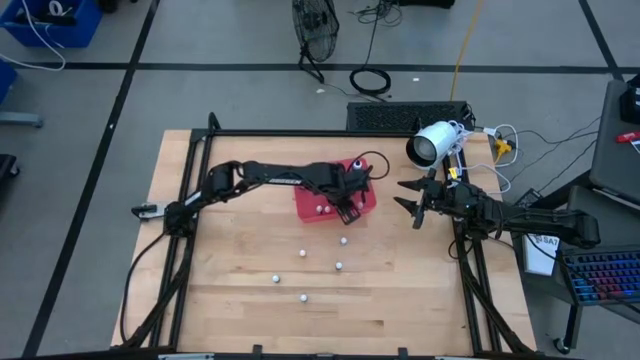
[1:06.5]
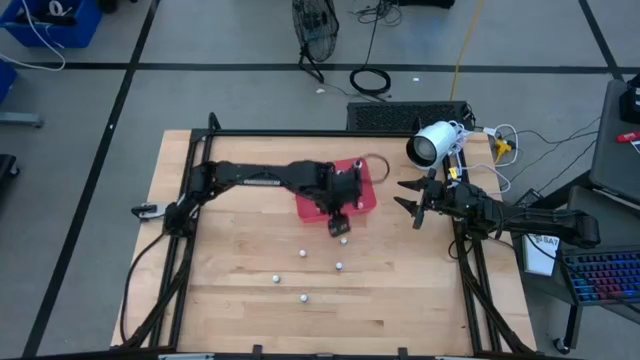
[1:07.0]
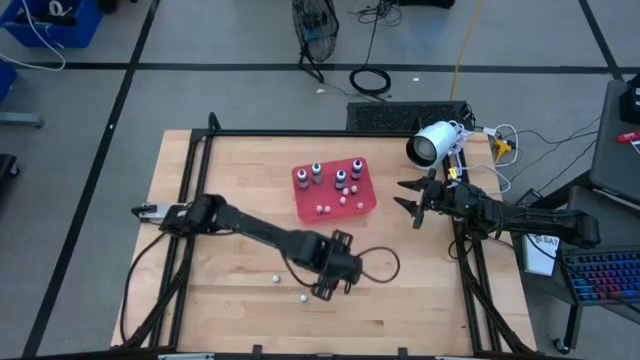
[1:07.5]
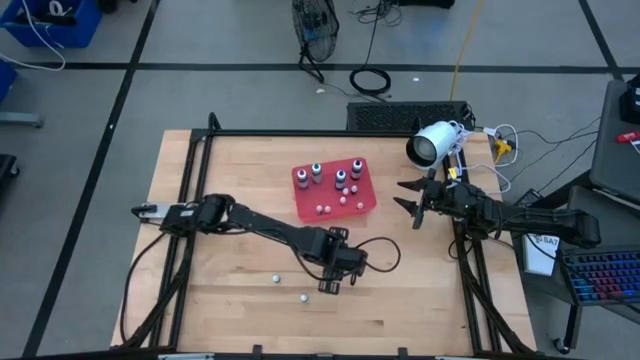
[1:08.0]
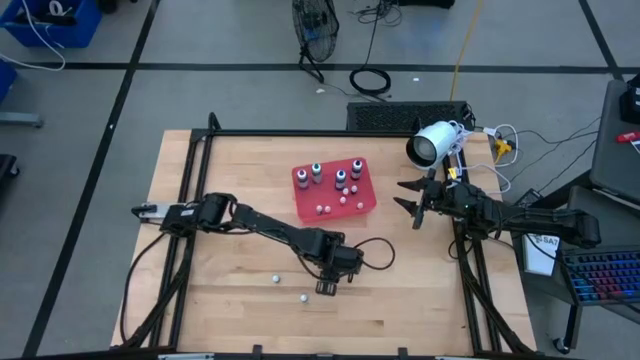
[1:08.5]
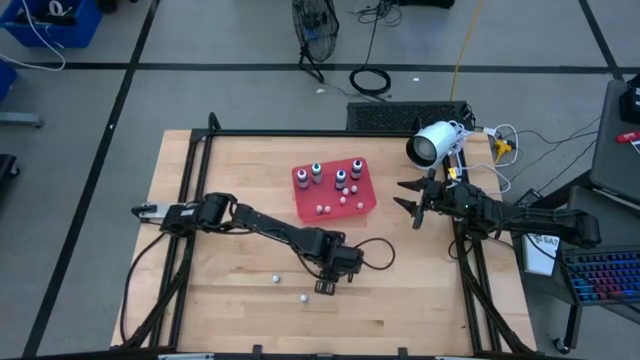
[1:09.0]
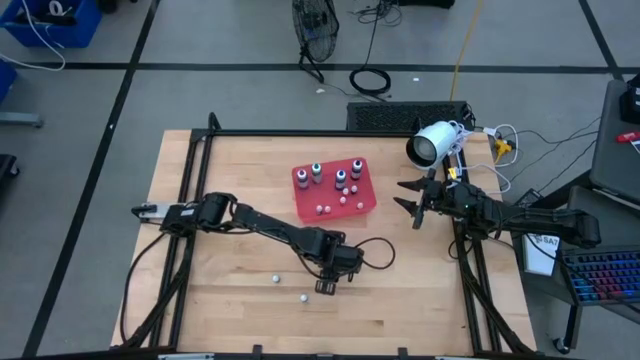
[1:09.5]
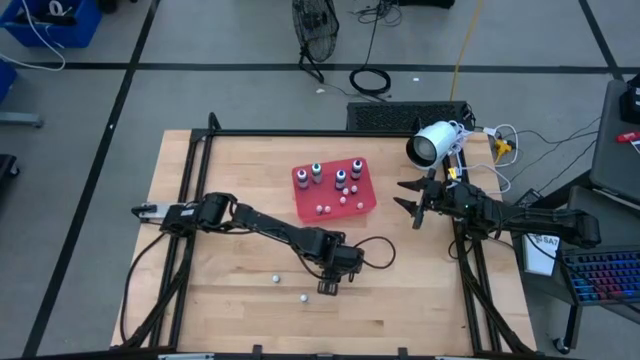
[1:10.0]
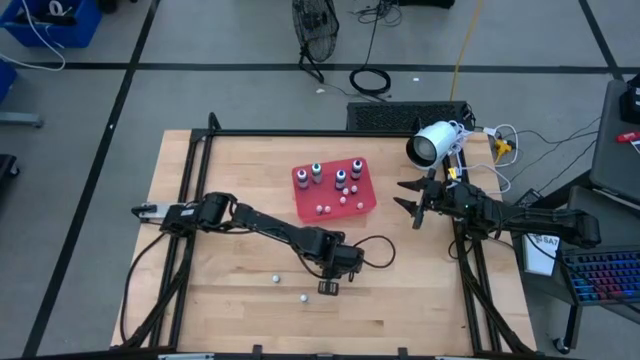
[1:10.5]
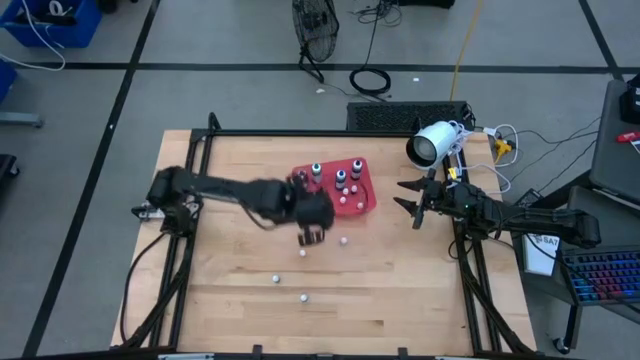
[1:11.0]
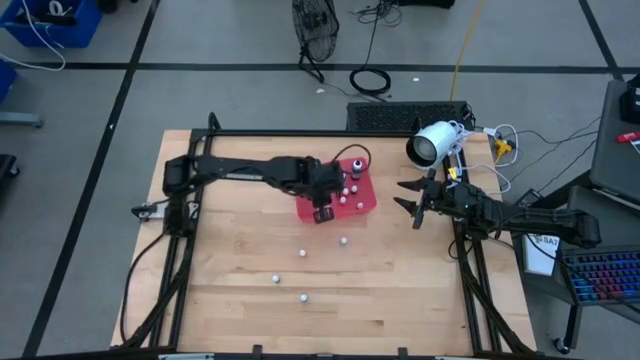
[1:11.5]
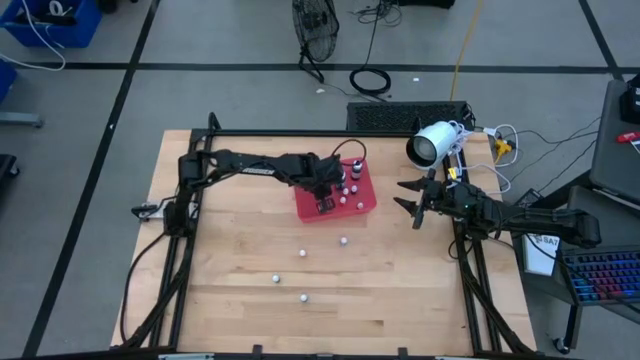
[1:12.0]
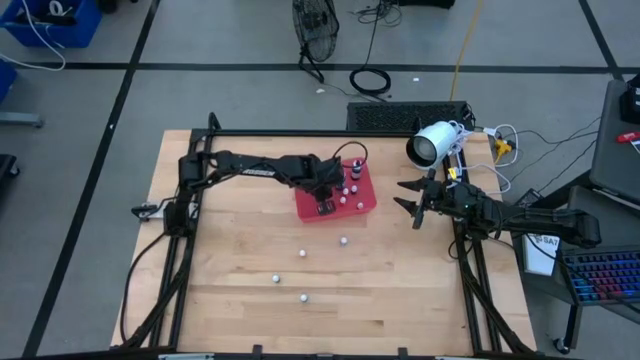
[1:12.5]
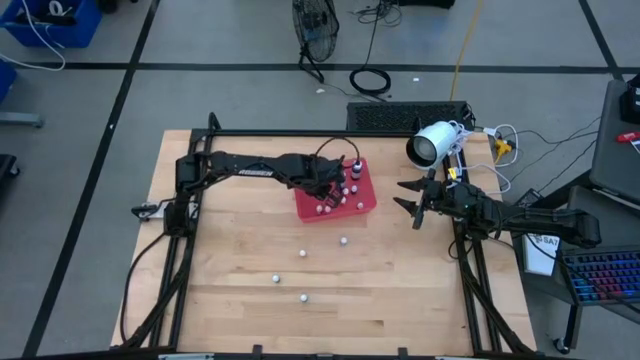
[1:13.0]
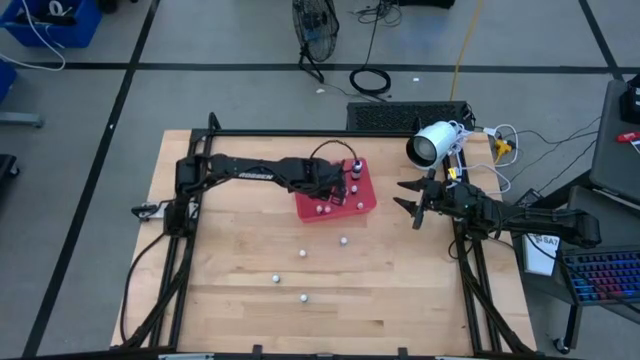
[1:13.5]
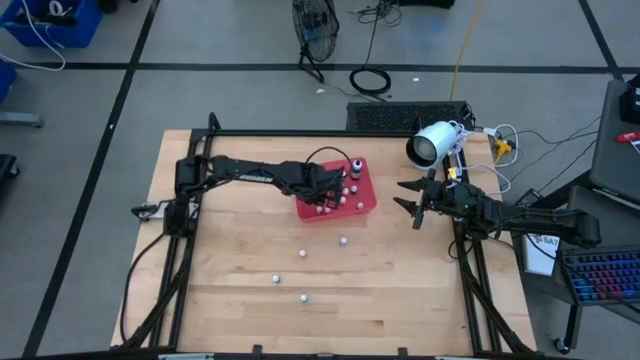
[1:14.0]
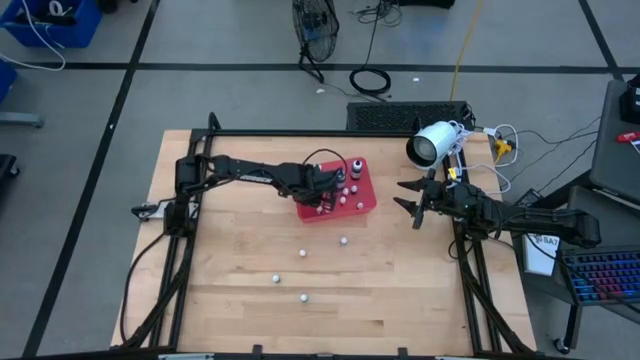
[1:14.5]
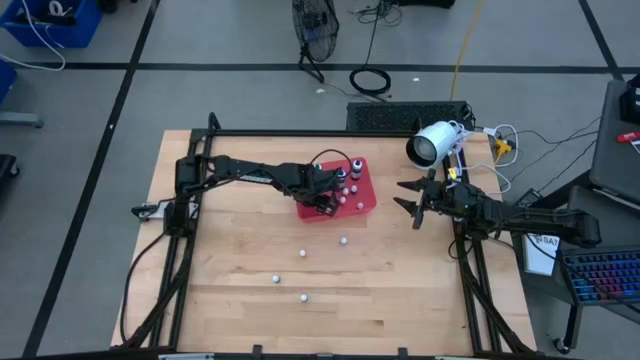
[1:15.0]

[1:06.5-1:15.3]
Task: Pick & Place food coloring
Put the top small purple food coloring bottle into the bin

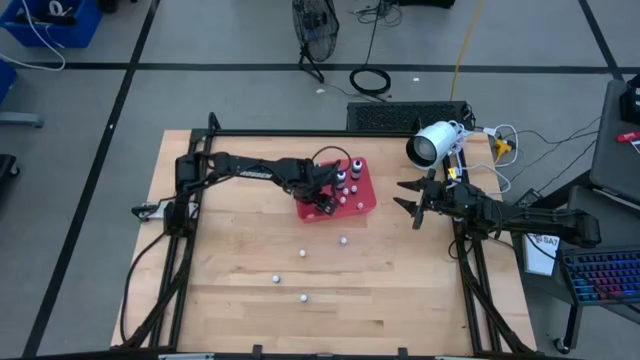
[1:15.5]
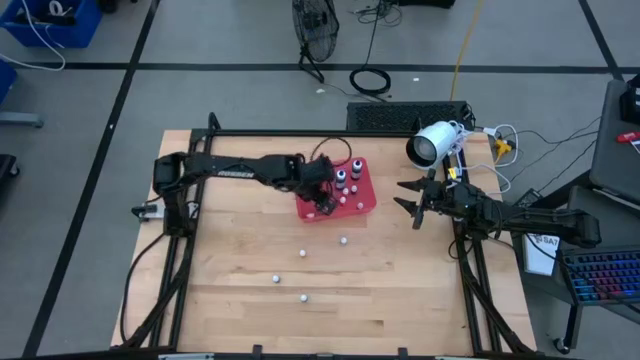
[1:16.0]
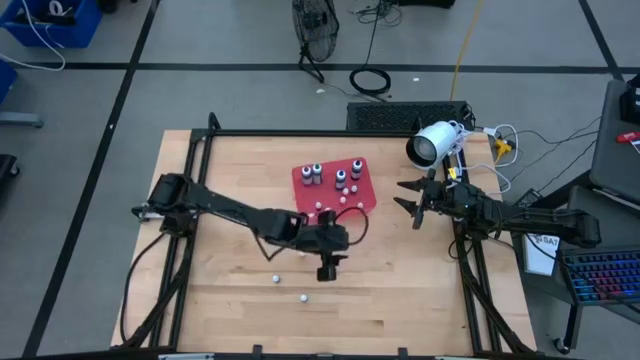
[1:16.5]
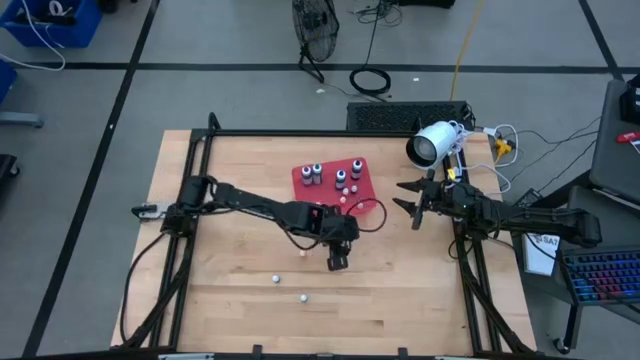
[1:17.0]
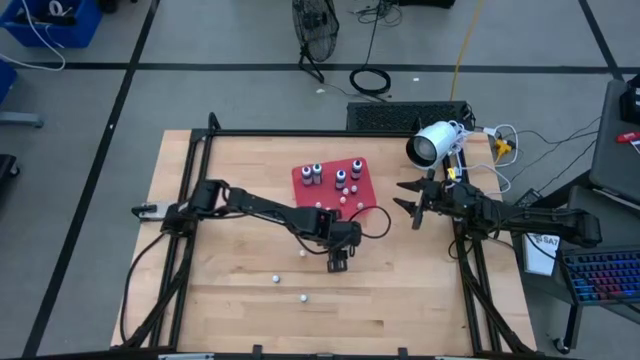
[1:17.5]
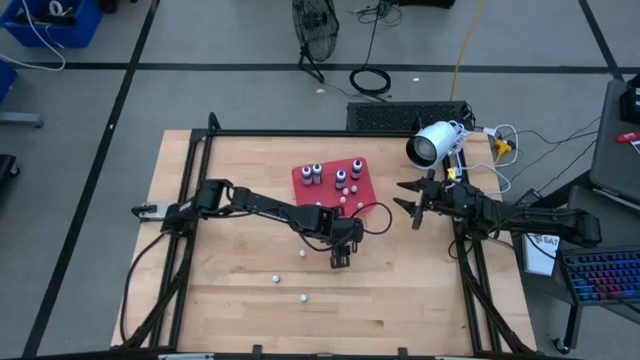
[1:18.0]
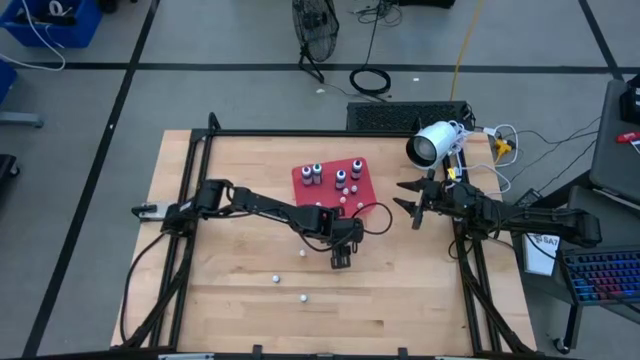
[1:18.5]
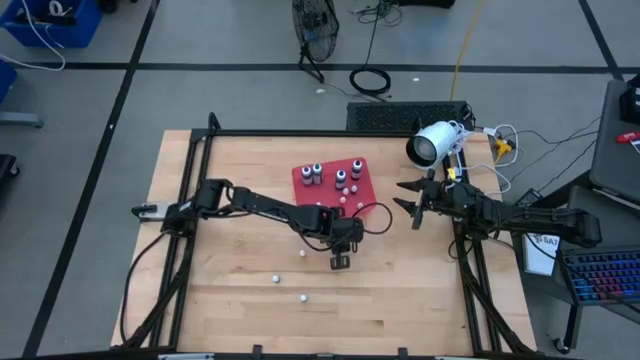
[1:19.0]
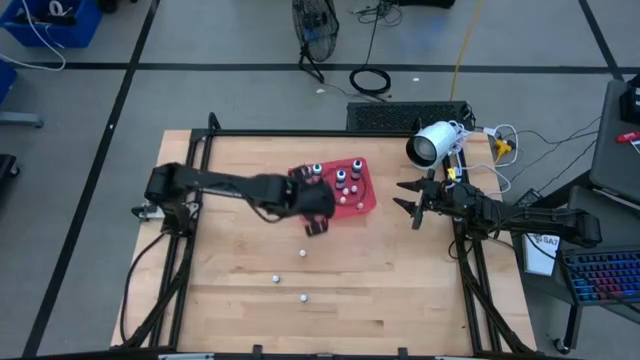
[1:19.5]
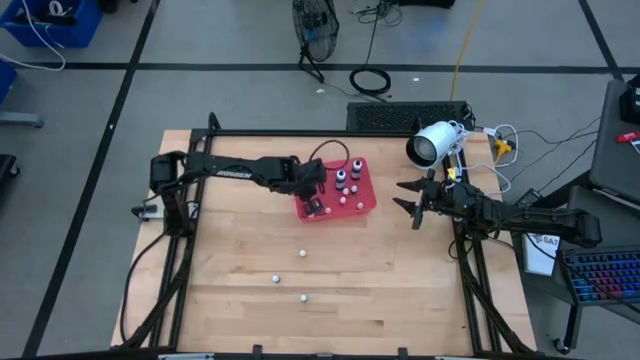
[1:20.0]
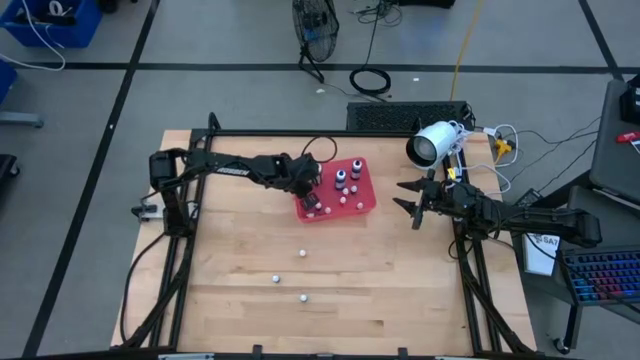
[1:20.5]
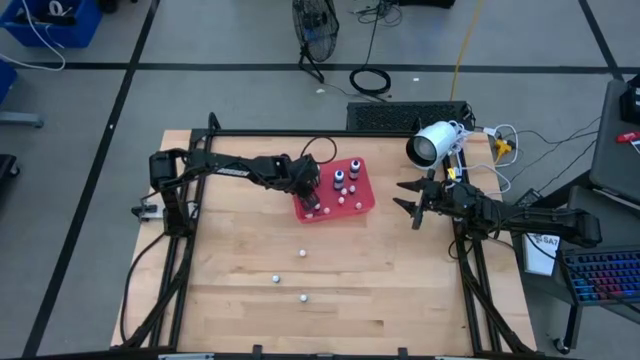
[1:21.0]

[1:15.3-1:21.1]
Put the small red food coloring bottle into the bin

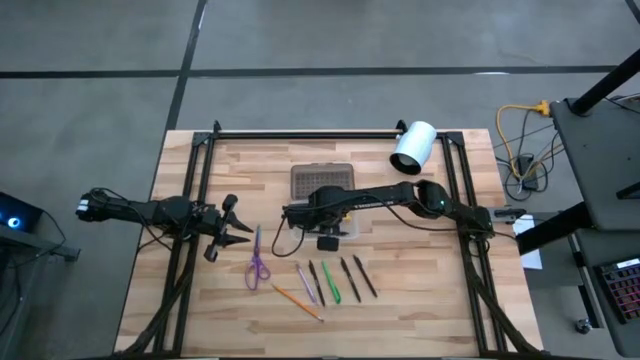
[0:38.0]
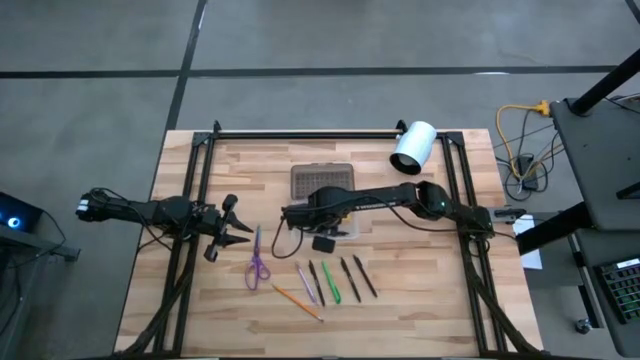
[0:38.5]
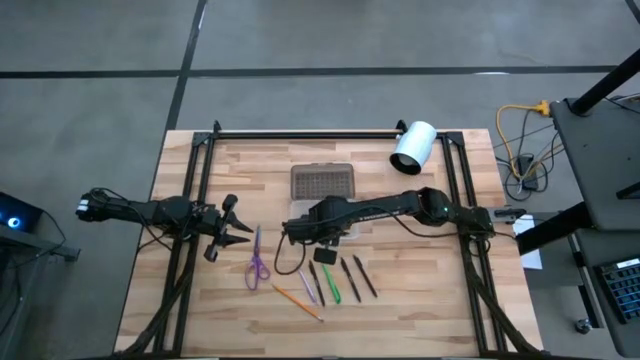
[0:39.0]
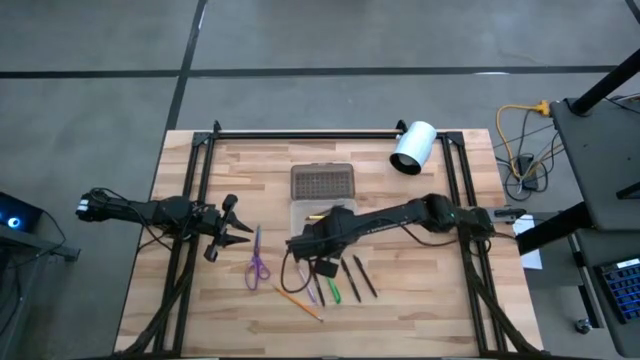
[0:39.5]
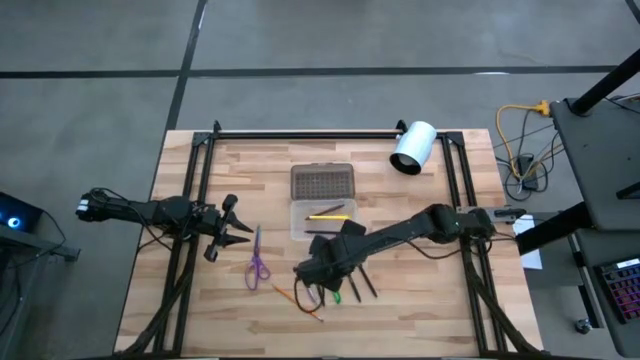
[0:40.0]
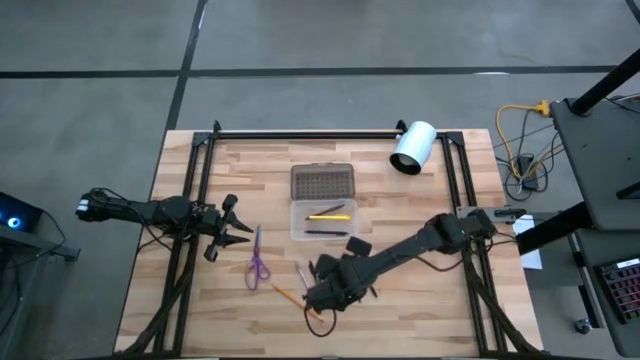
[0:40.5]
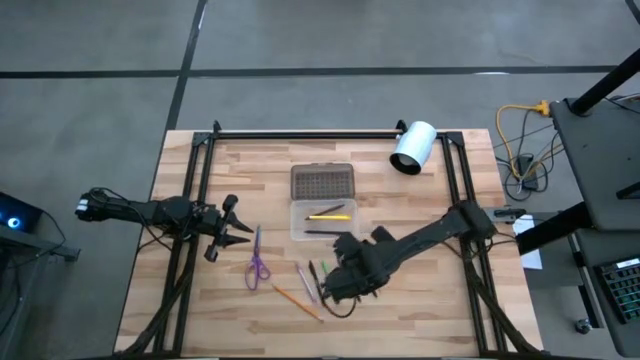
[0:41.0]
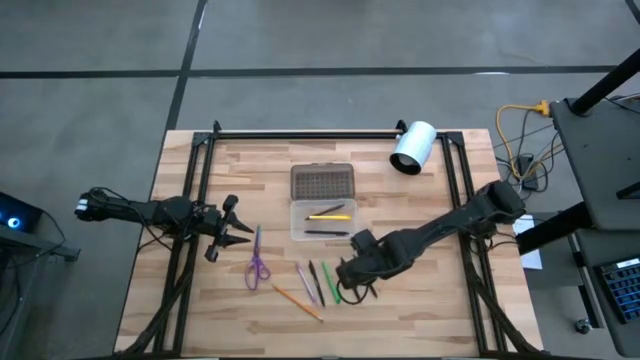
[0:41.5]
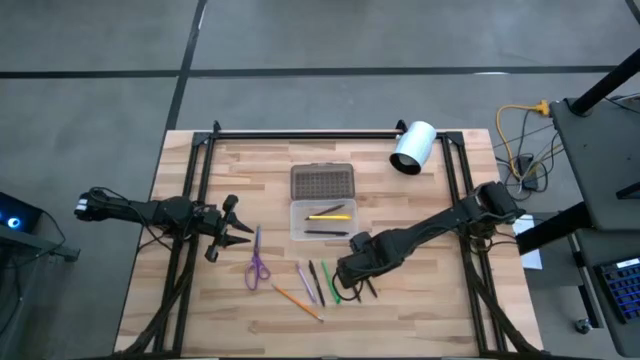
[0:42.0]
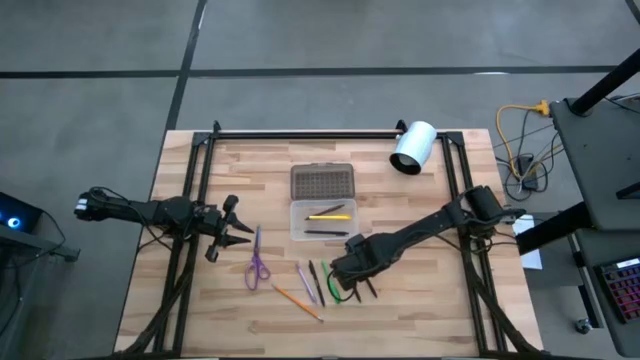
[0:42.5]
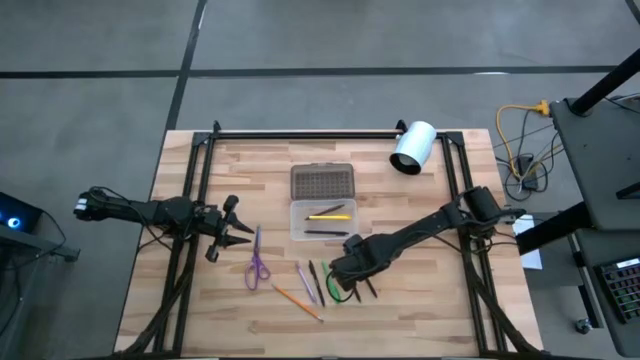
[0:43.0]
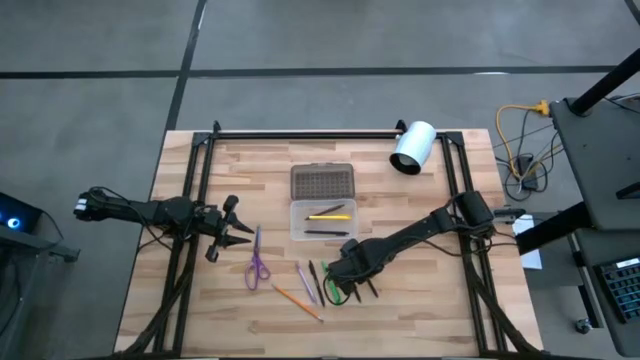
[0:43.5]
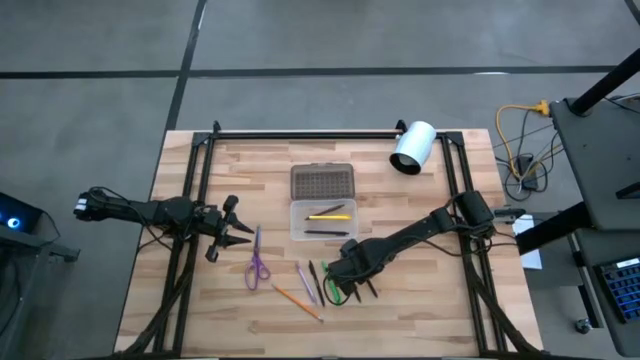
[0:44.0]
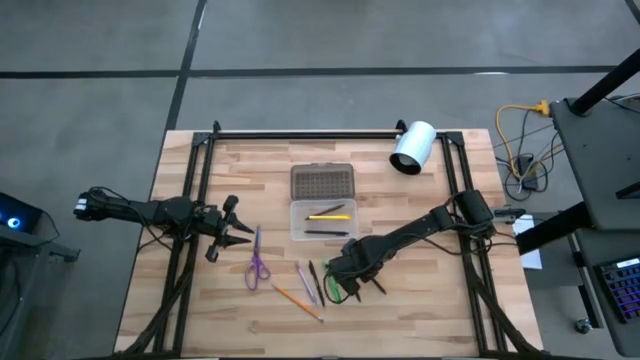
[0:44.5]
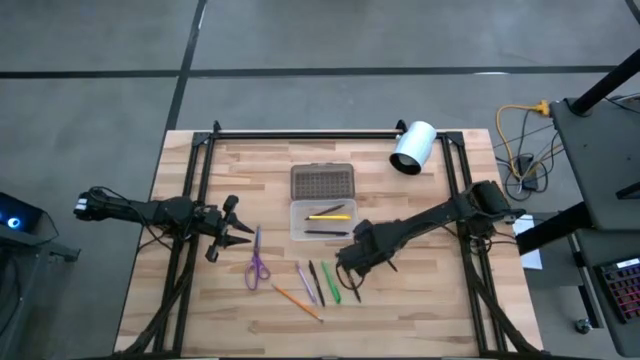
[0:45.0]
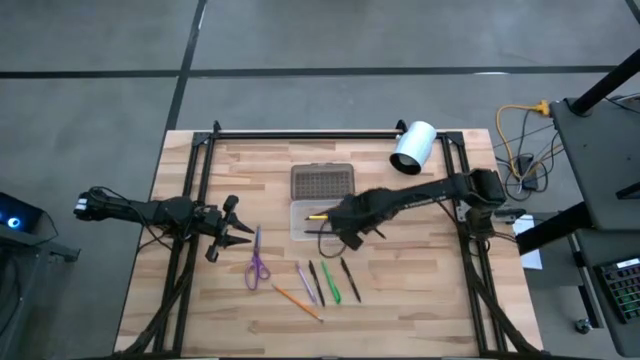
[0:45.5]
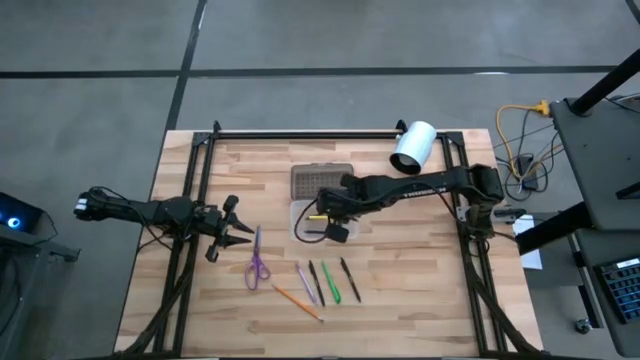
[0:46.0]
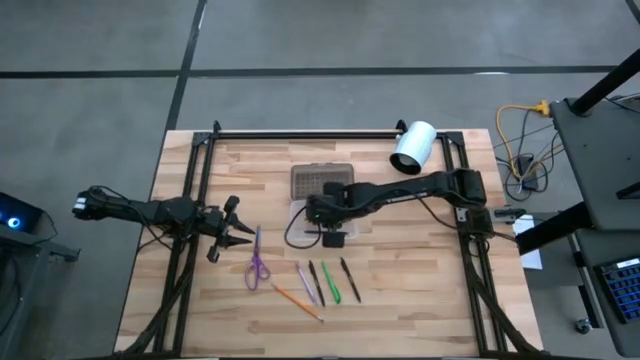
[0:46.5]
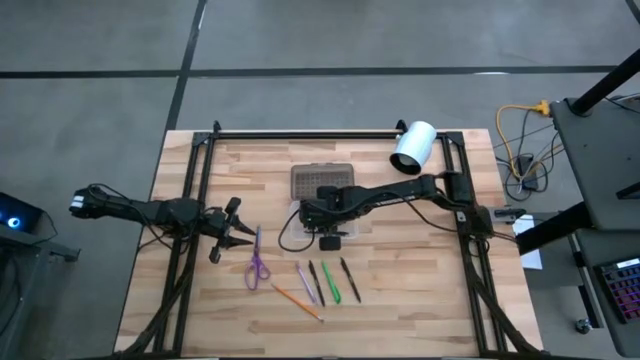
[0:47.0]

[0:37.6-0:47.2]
Task: Pick & place school supplies into a supply box
Put the black pen into the supply box
